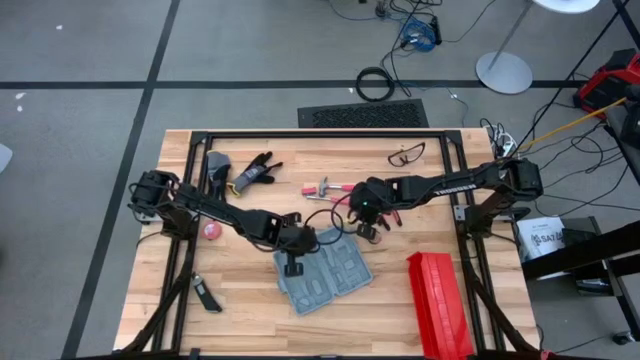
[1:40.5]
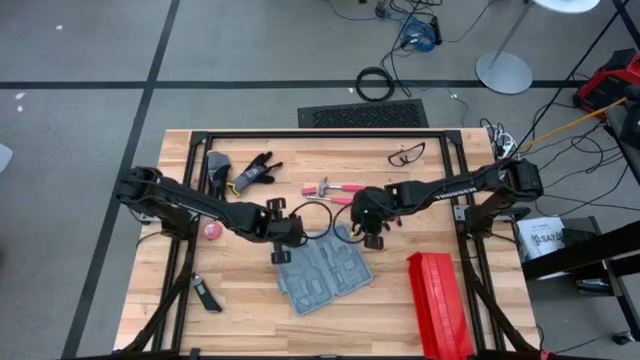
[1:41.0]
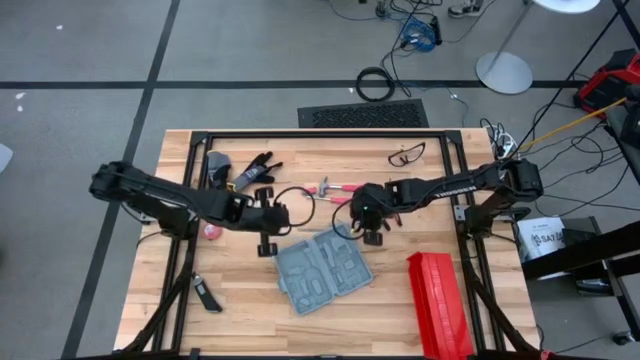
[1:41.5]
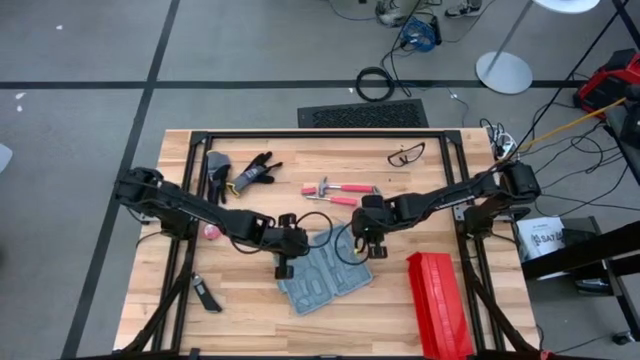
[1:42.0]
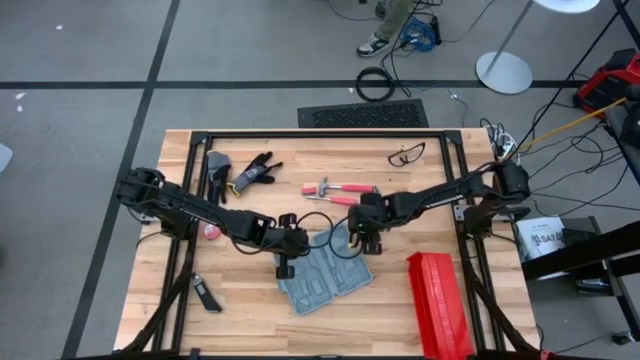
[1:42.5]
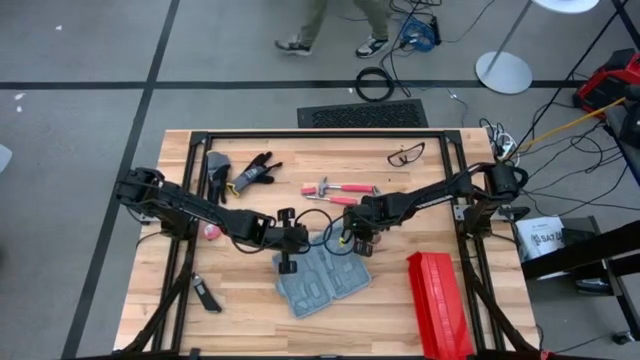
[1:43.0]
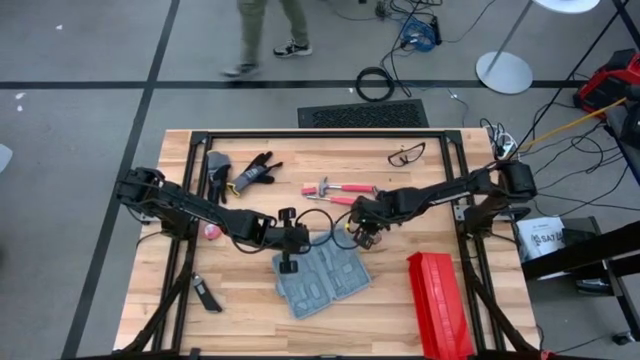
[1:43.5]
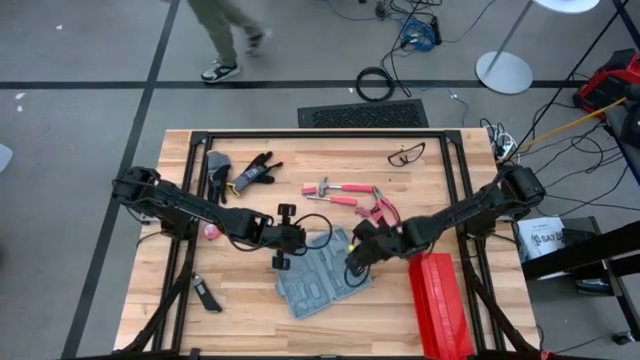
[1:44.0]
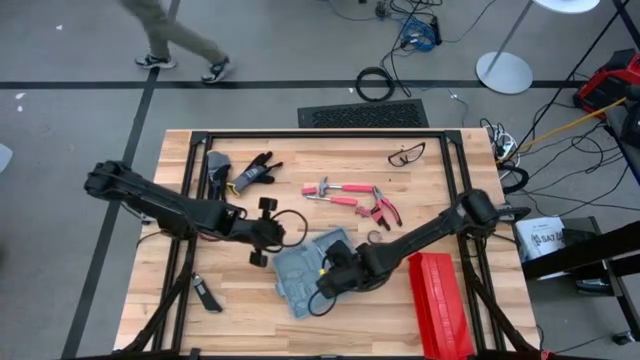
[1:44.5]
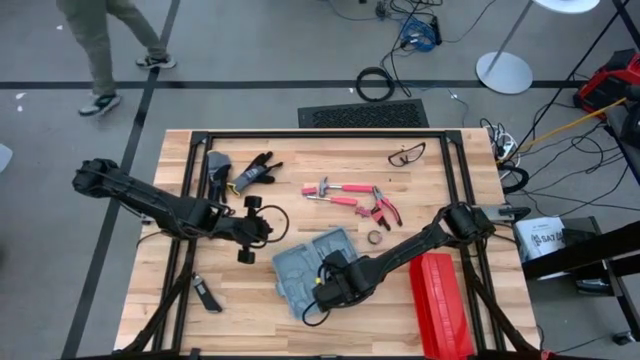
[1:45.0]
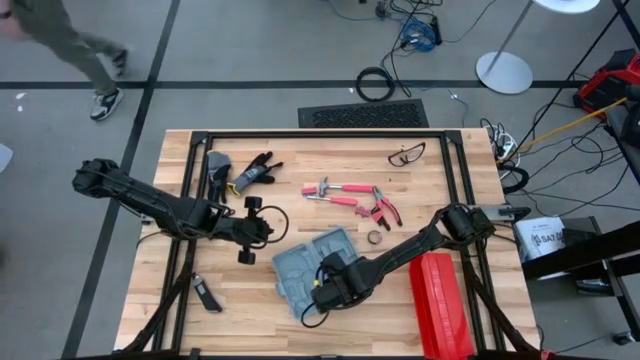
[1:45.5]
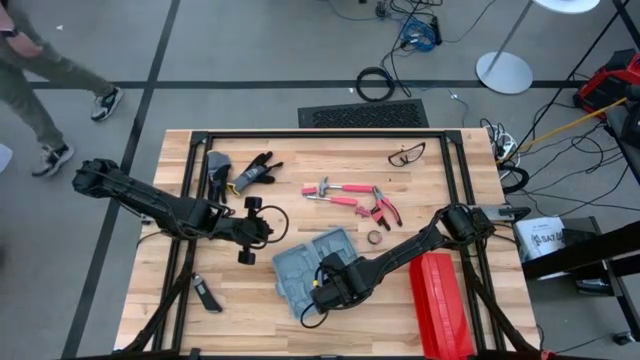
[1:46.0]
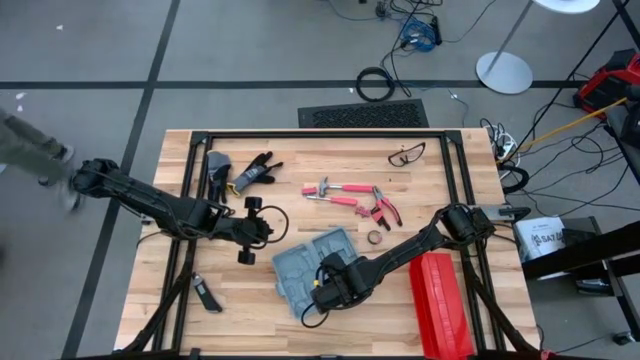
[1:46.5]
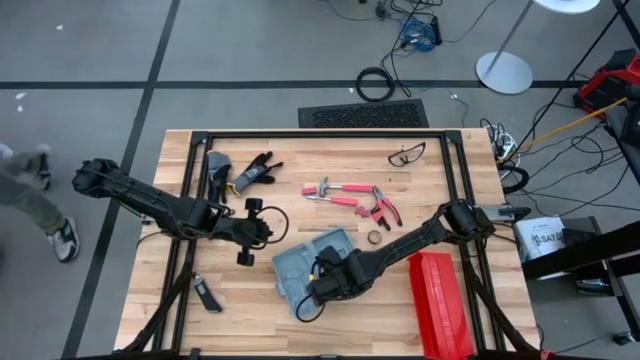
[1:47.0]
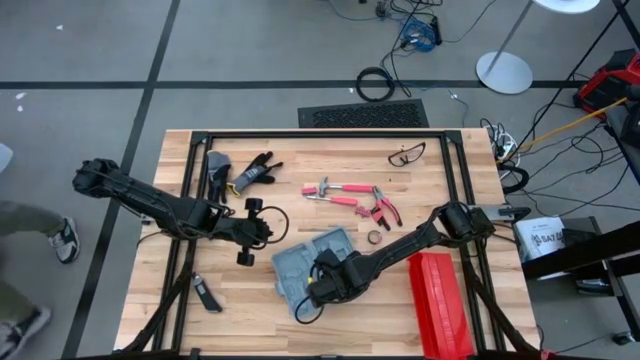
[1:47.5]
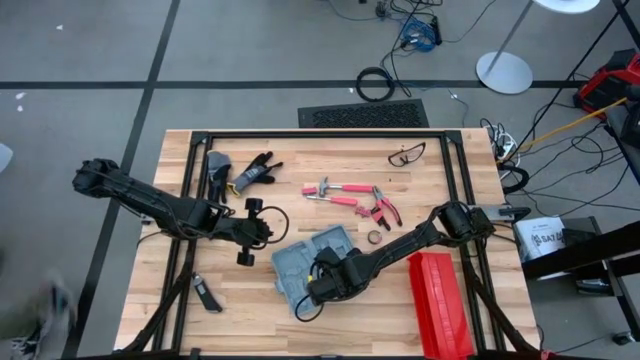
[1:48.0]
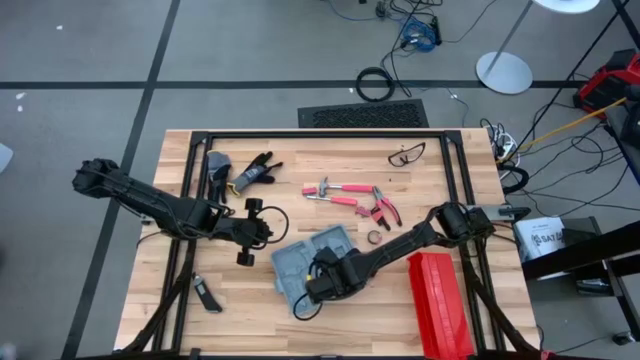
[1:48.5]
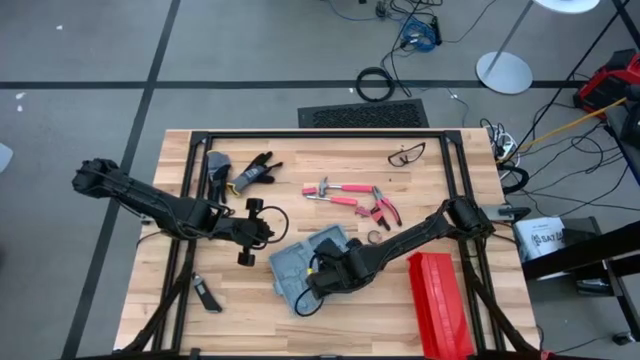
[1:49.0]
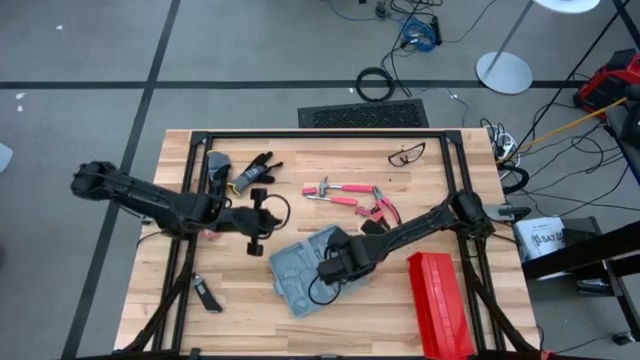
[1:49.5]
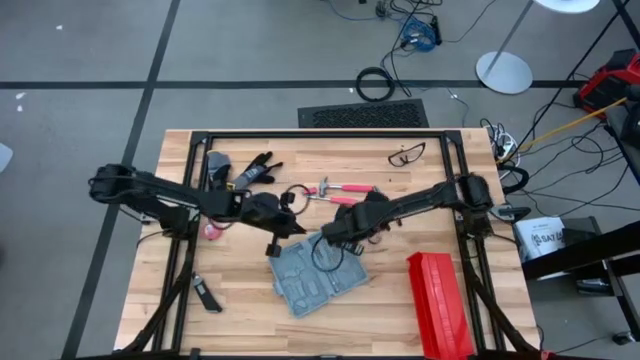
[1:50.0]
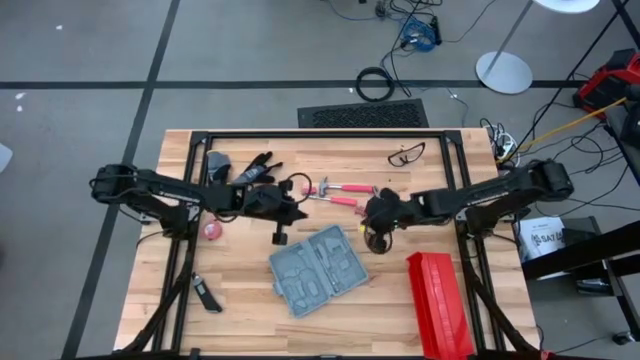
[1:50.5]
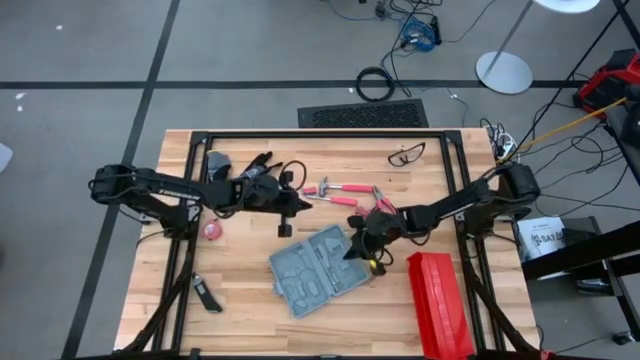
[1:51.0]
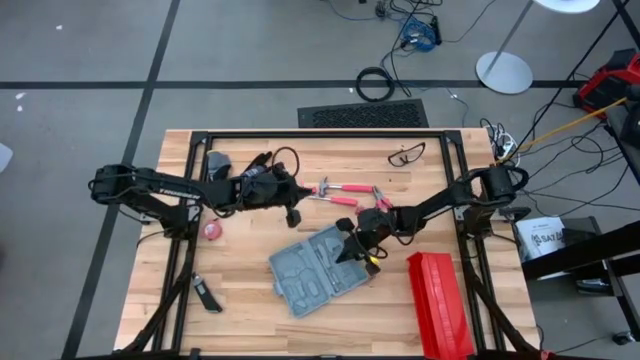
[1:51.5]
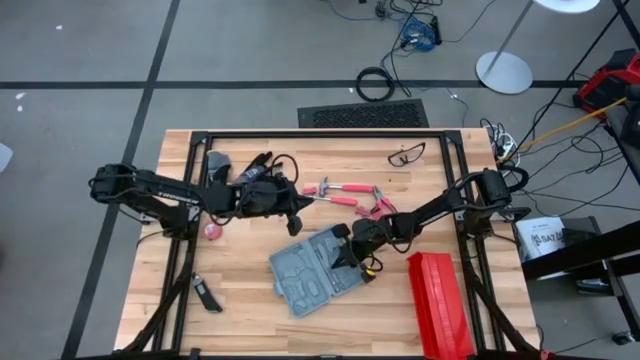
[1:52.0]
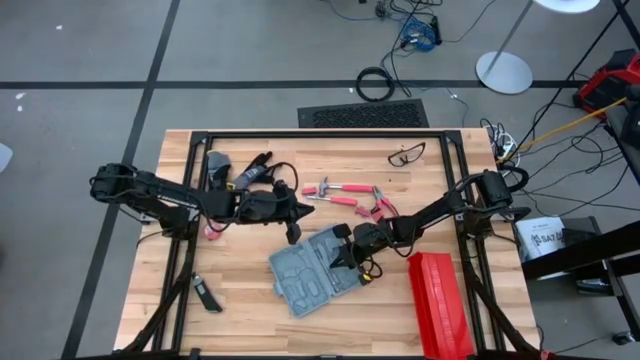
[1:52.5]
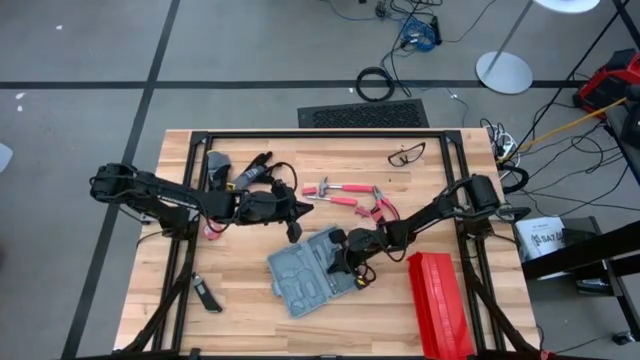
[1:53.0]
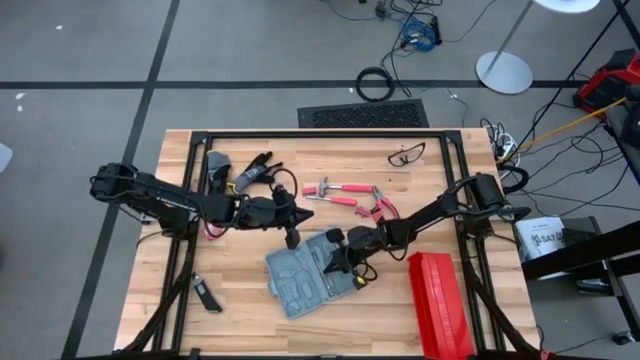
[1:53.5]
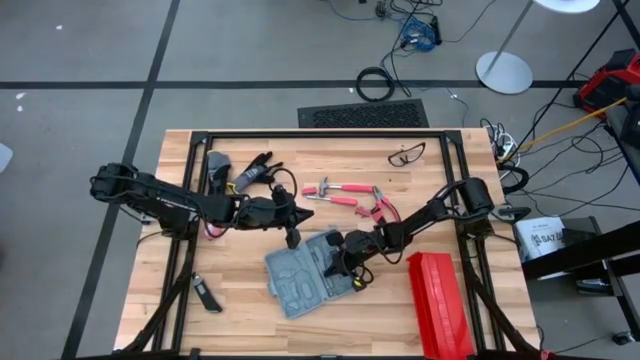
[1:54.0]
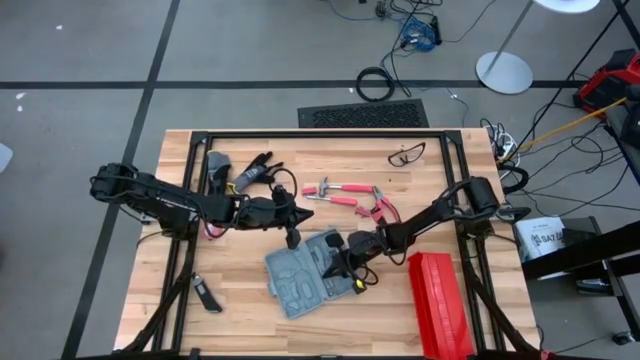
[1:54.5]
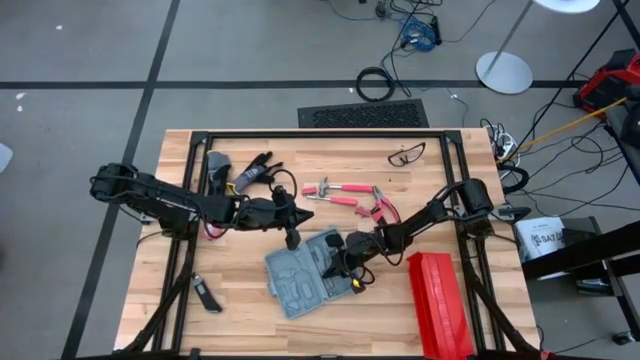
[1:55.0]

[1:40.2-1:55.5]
Task: prefit tool cases
Put the transparent screwdriver into the gray prefit tools case

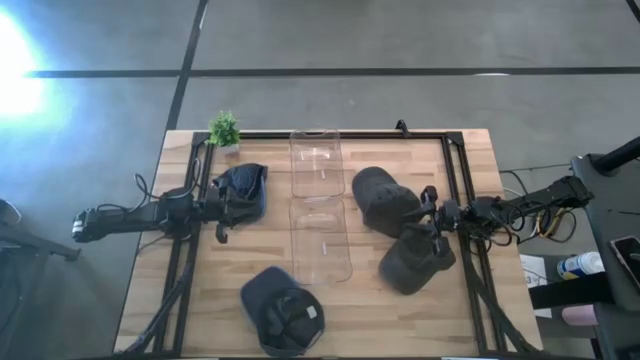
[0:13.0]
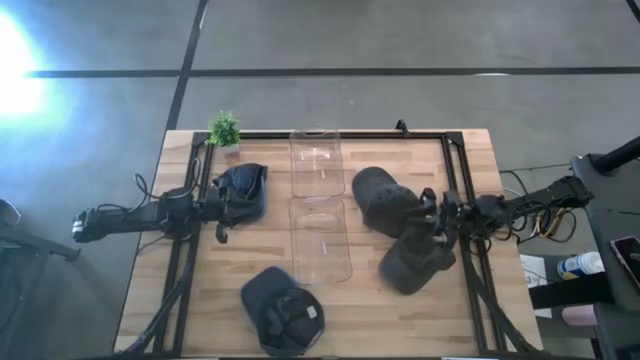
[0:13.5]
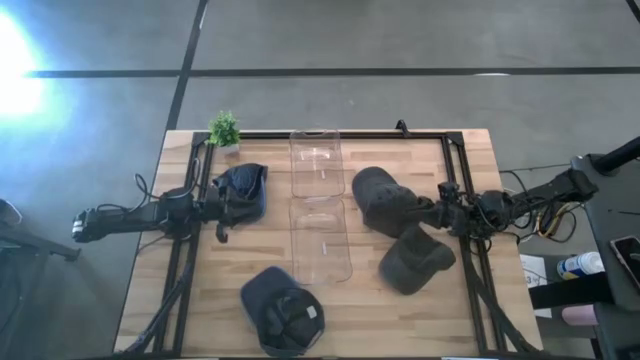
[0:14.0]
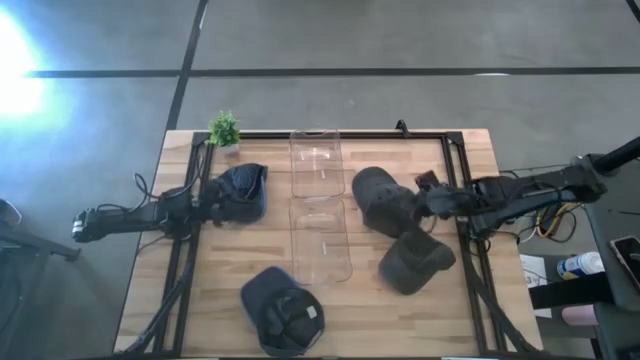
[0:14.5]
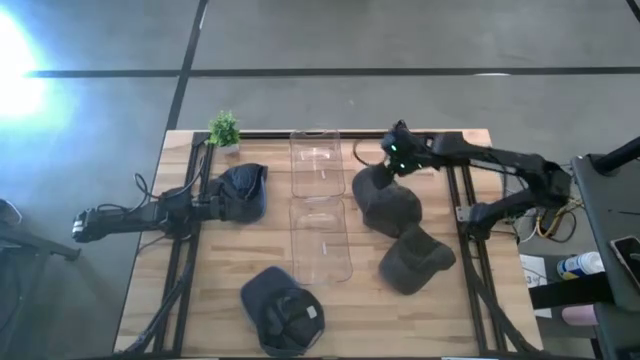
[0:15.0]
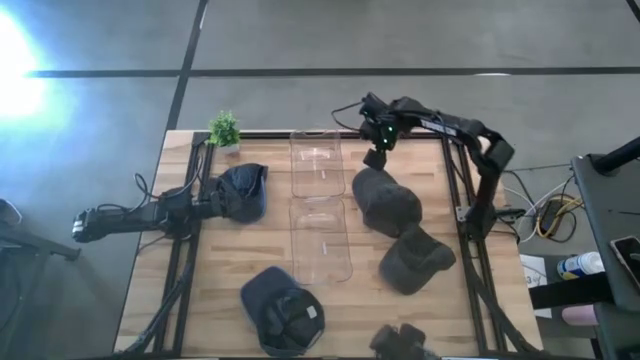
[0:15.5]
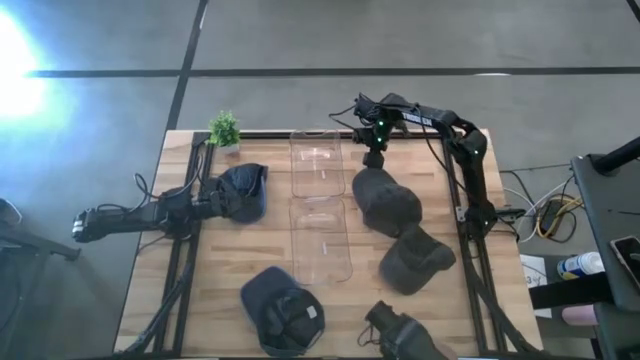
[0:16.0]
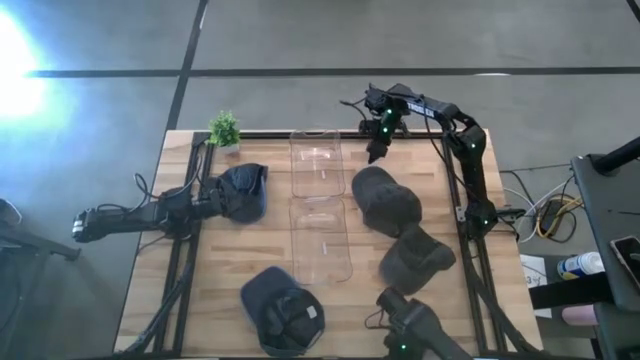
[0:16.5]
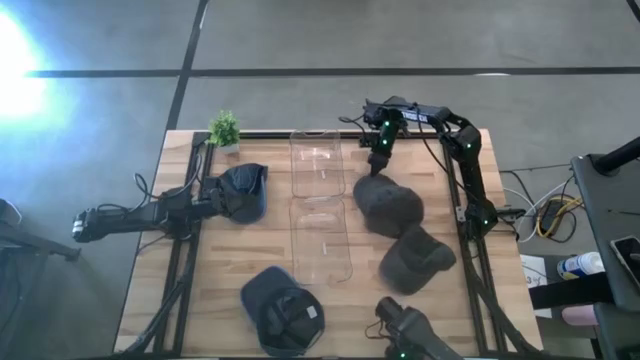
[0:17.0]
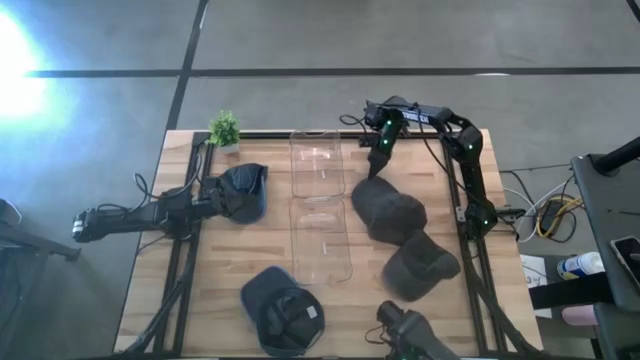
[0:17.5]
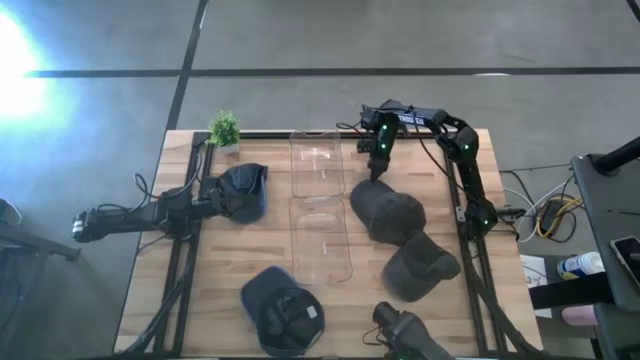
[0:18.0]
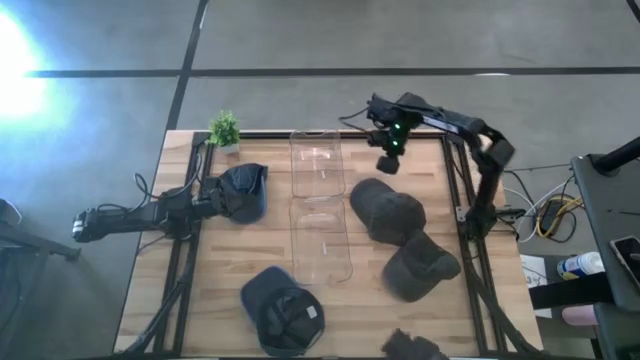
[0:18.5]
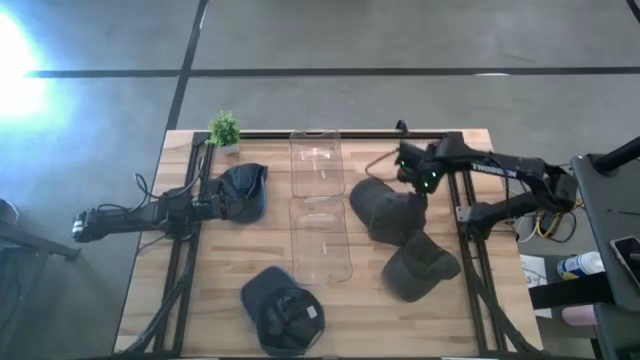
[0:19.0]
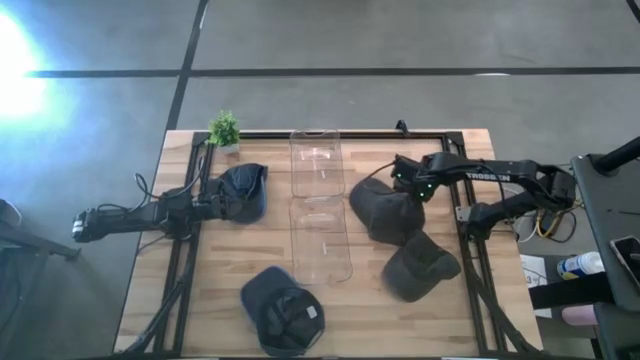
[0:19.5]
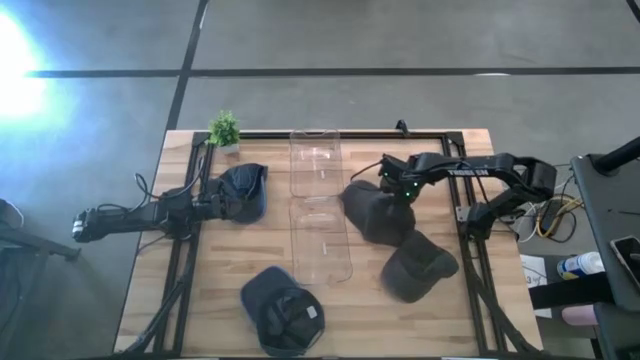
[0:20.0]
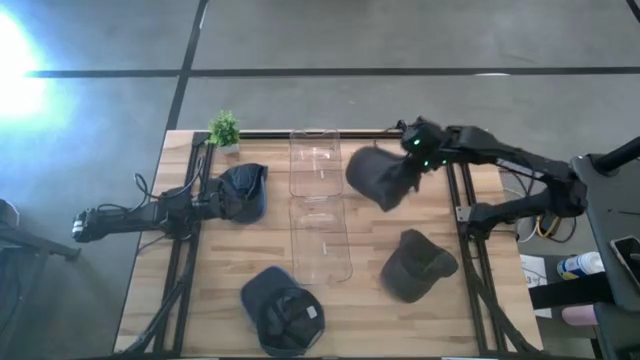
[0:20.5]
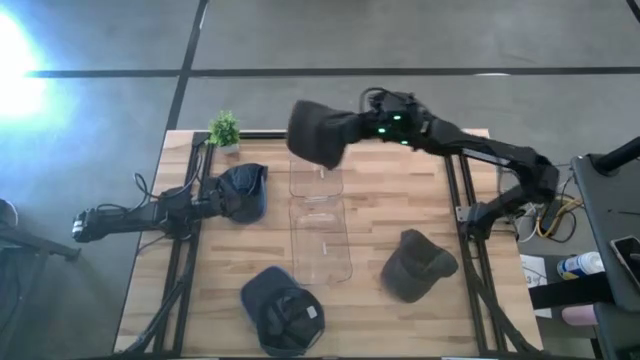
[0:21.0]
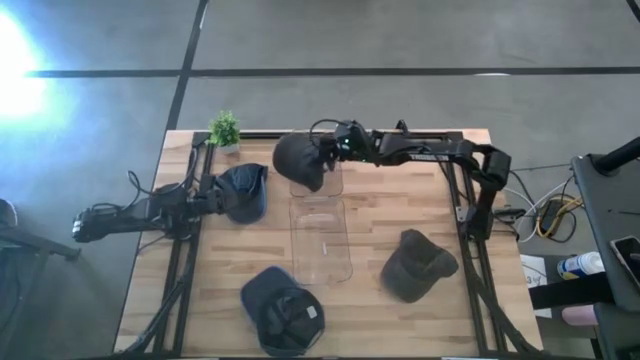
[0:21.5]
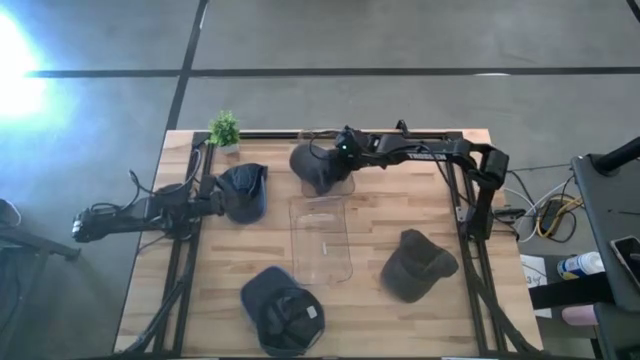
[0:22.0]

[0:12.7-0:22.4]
Task: Pick & Place hat
Put the top black cap into the top transparent bin
